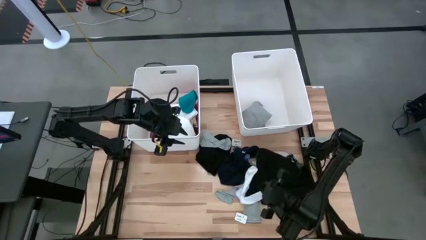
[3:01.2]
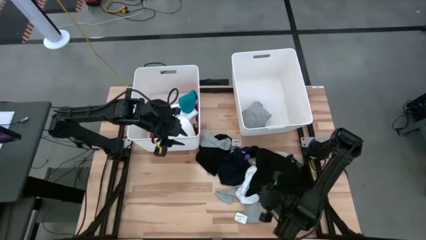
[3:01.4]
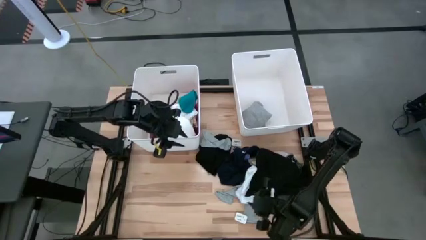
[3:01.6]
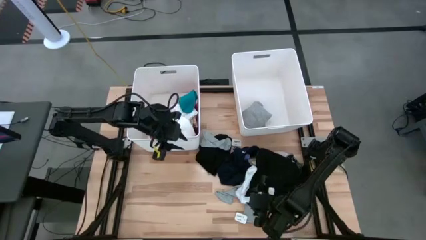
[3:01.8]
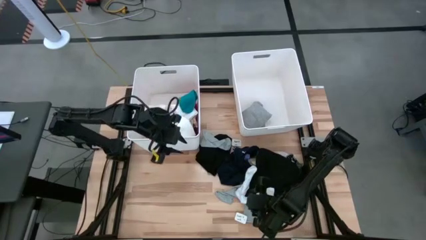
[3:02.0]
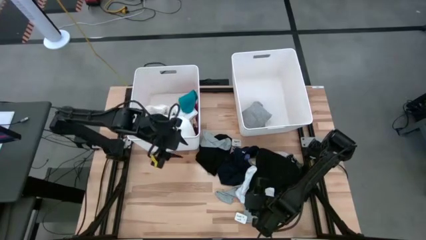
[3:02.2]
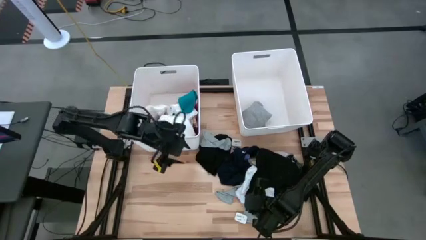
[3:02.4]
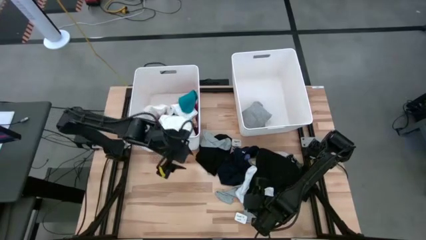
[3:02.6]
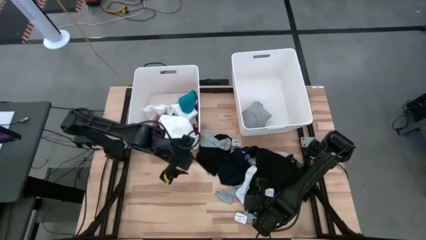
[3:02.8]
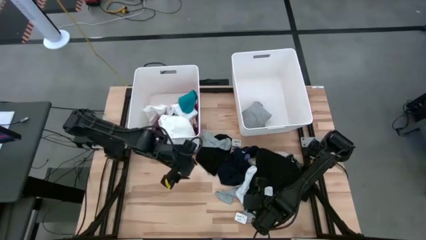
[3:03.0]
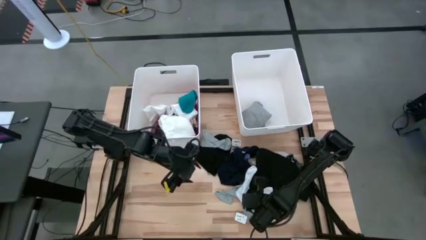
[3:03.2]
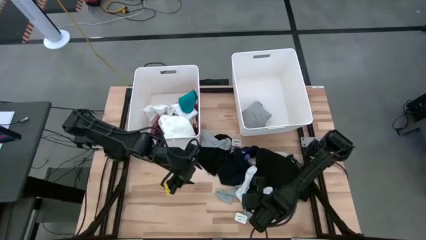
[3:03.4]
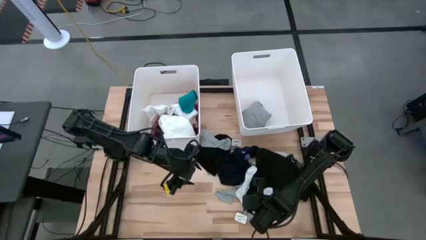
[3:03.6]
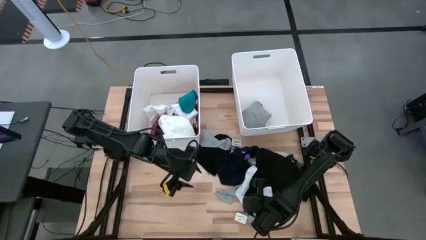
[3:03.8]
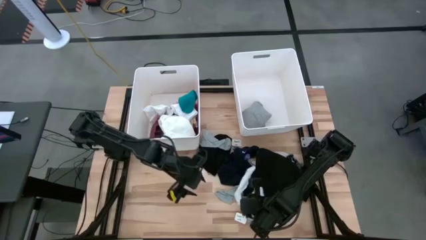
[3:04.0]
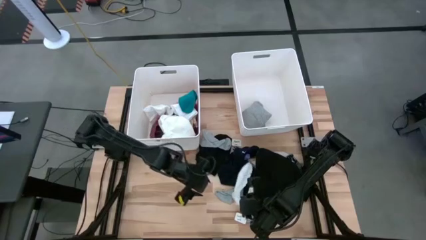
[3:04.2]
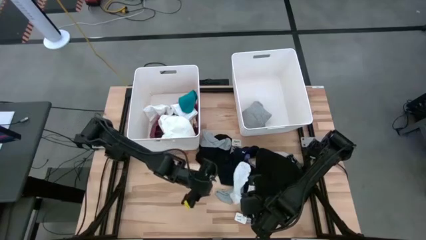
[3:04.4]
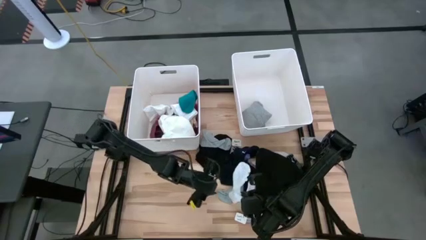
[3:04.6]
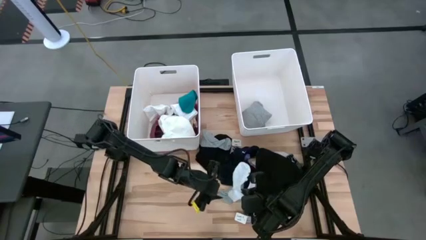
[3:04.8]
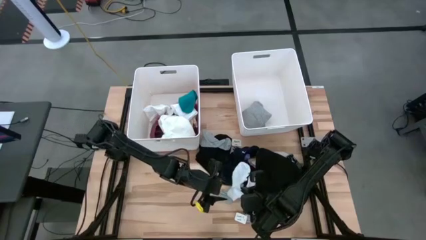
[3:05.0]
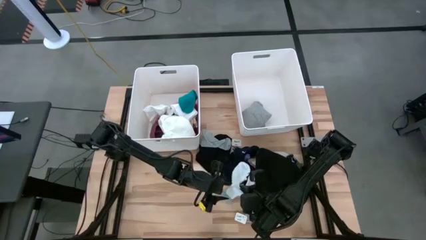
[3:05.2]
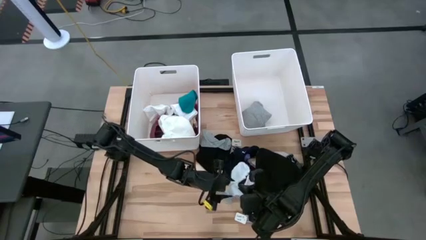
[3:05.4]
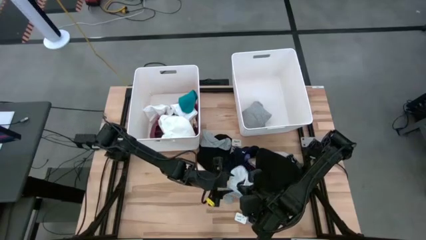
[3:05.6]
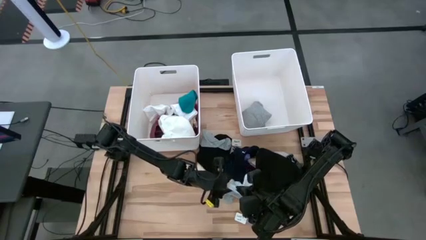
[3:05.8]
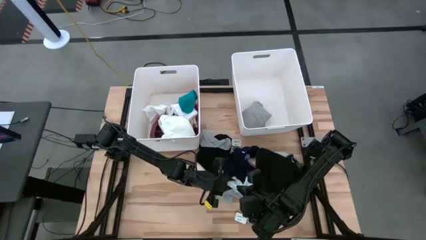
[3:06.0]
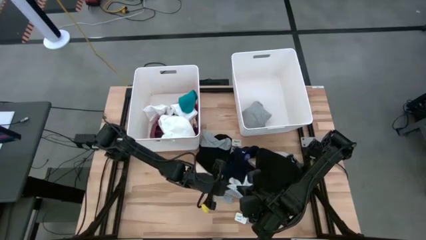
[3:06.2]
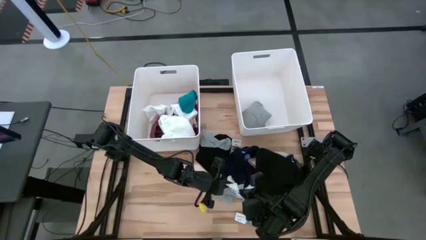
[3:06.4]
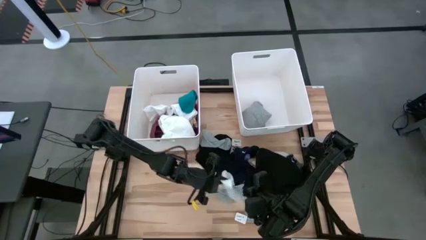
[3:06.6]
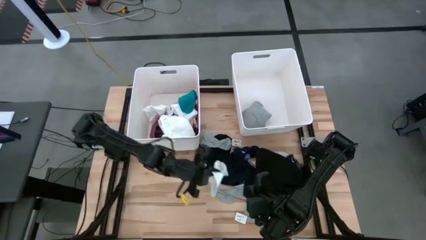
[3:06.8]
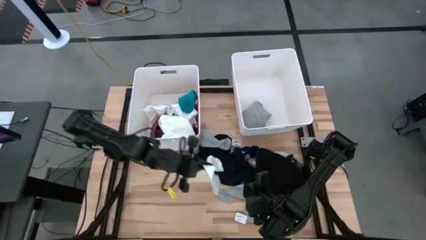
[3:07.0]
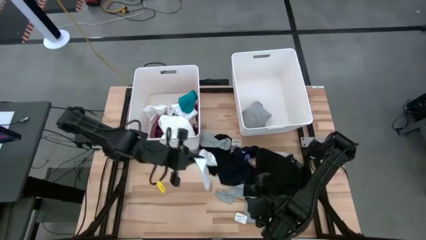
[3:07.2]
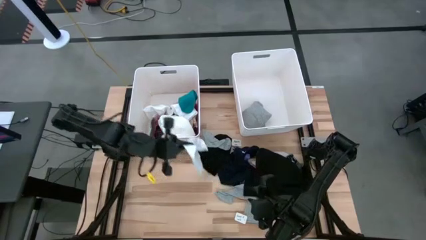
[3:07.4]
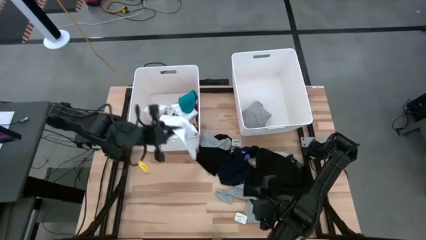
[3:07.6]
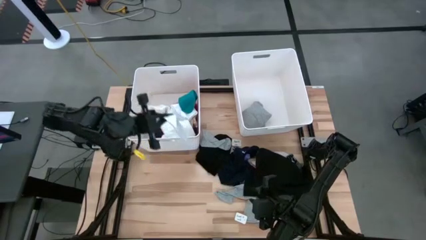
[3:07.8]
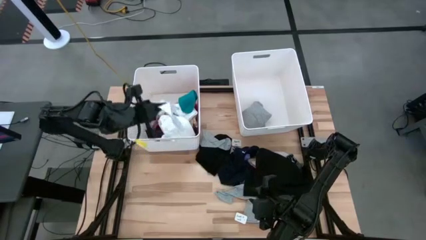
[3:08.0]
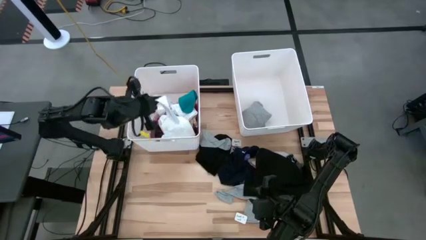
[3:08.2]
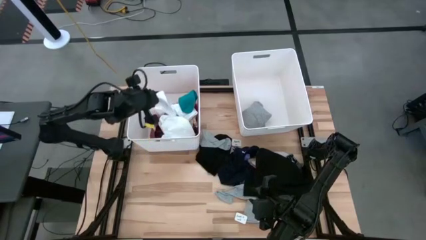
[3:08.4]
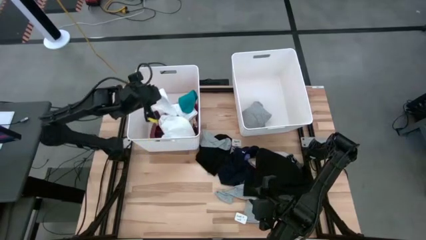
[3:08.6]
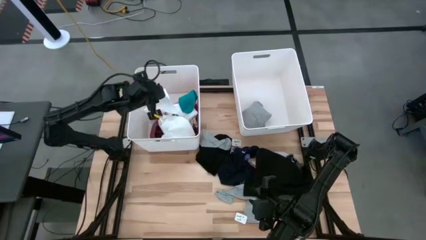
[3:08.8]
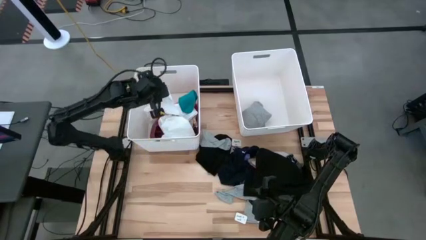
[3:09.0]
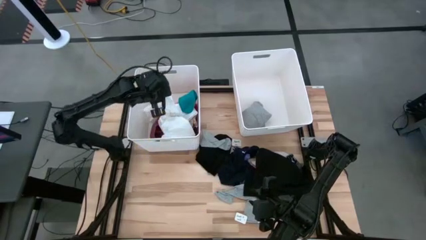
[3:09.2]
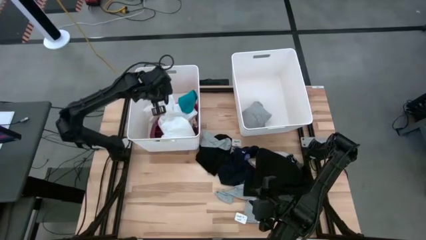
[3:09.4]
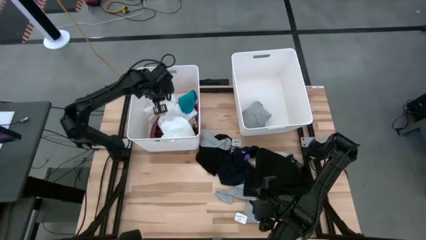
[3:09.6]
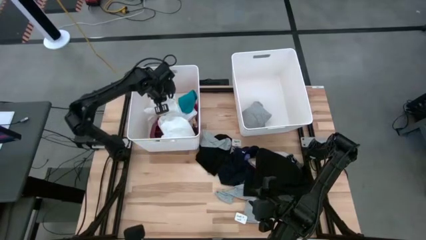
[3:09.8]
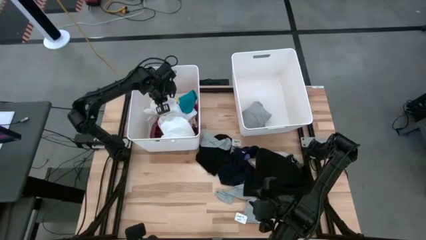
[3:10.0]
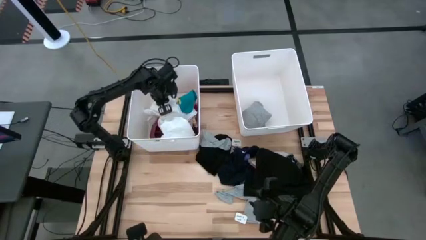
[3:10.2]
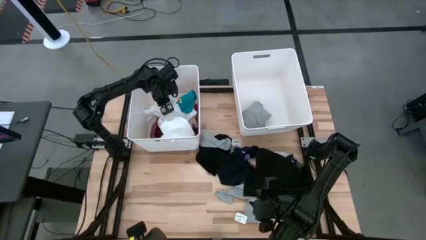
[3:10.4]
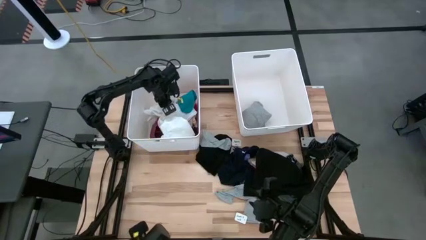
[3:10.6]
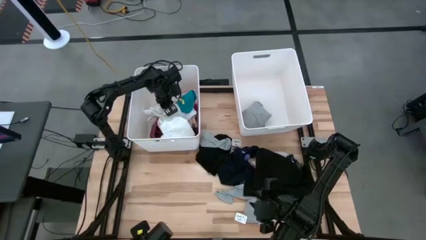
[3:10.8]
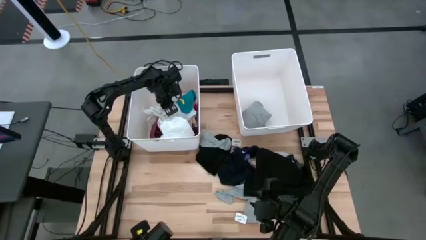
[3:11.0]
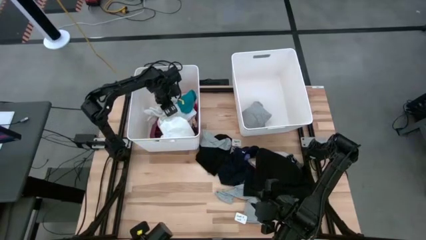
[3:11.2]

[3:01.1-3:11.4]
Task: Sort clothes
Put the white sock into the left white bin
